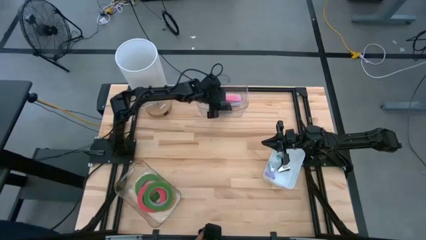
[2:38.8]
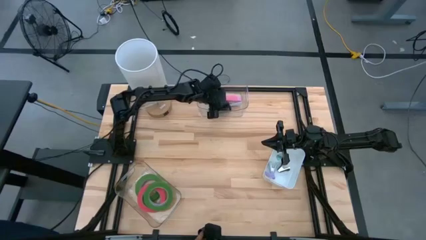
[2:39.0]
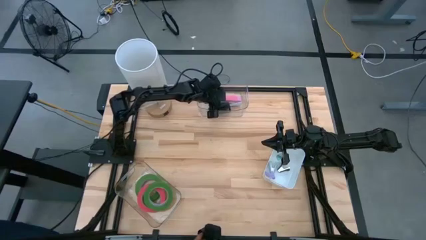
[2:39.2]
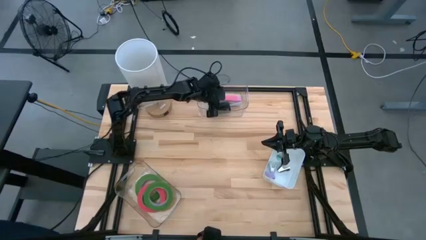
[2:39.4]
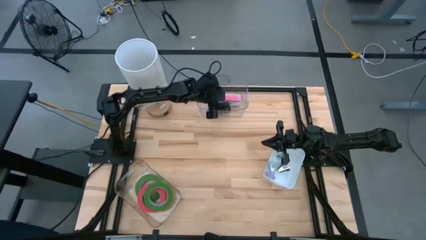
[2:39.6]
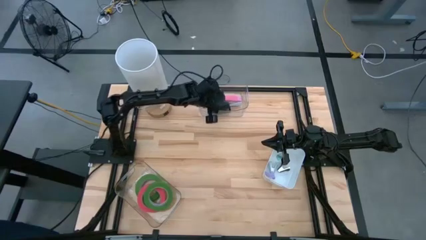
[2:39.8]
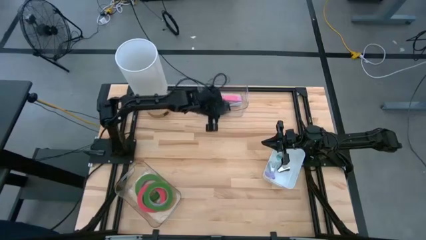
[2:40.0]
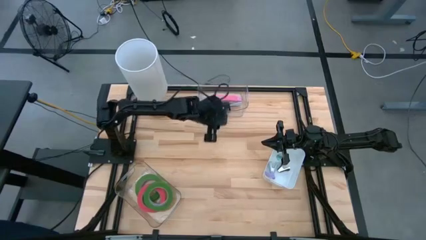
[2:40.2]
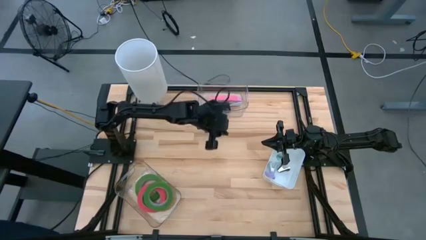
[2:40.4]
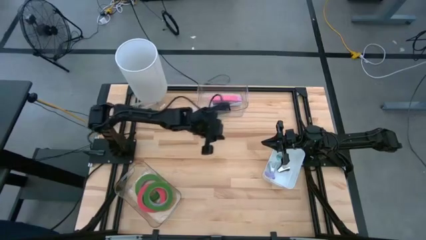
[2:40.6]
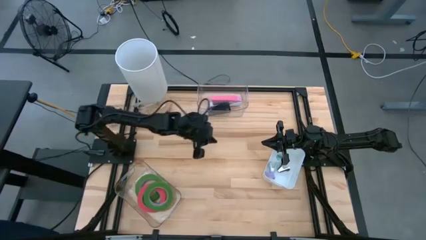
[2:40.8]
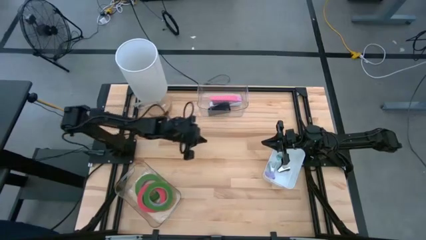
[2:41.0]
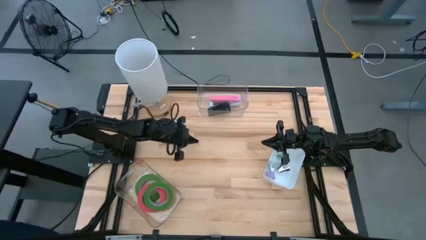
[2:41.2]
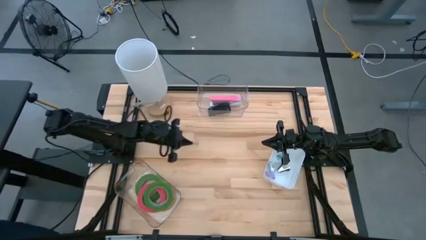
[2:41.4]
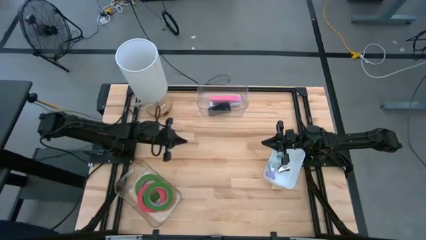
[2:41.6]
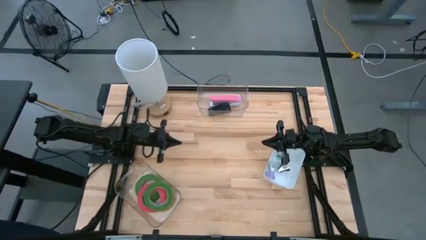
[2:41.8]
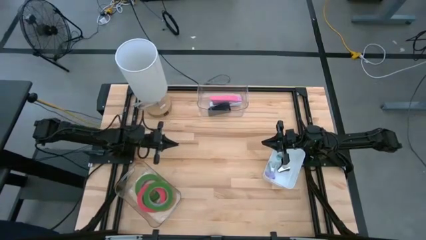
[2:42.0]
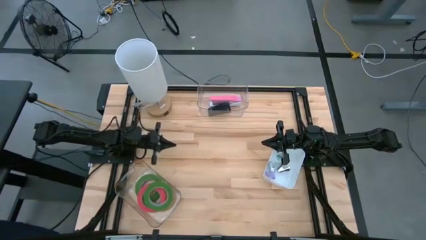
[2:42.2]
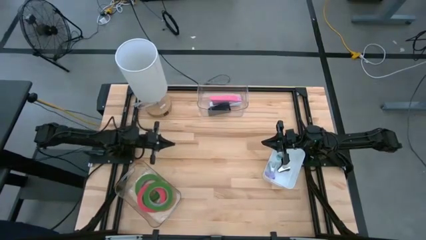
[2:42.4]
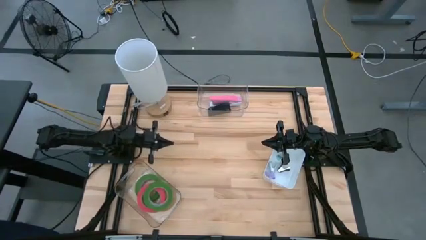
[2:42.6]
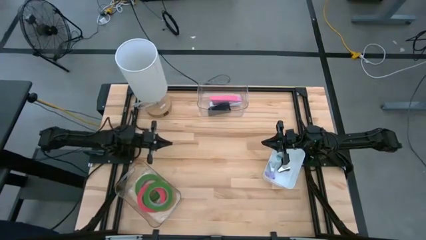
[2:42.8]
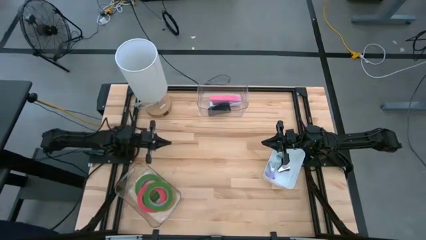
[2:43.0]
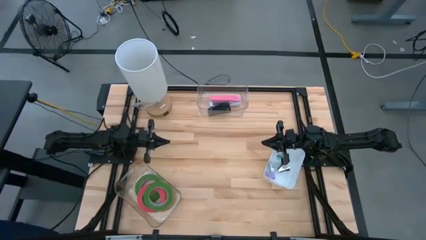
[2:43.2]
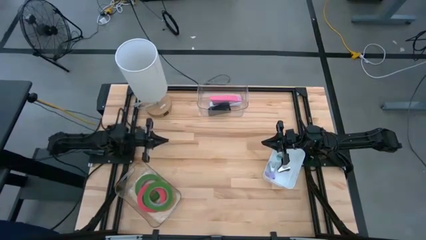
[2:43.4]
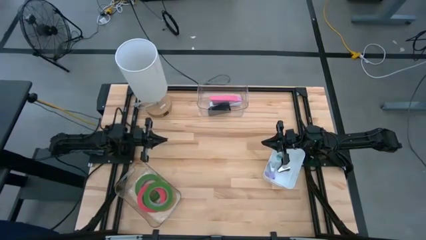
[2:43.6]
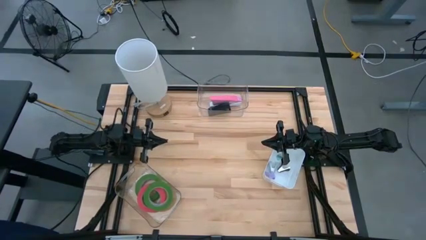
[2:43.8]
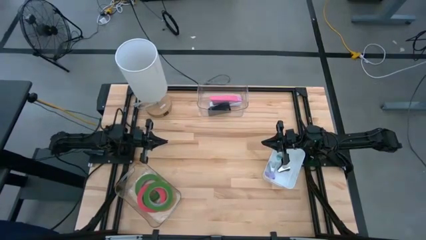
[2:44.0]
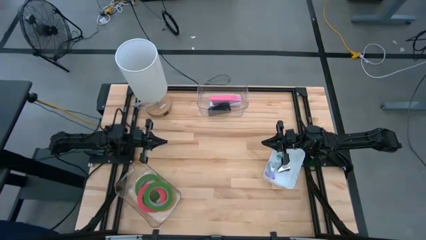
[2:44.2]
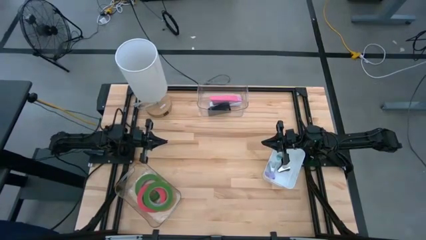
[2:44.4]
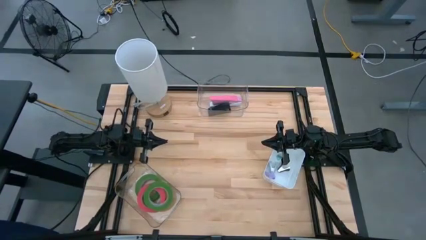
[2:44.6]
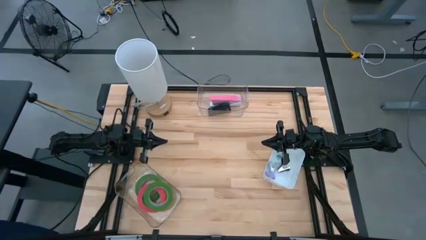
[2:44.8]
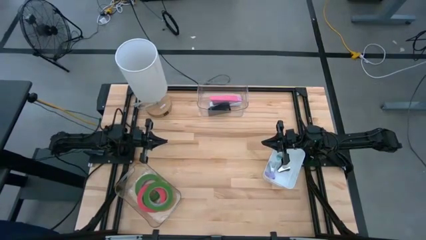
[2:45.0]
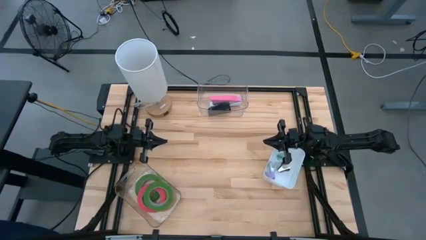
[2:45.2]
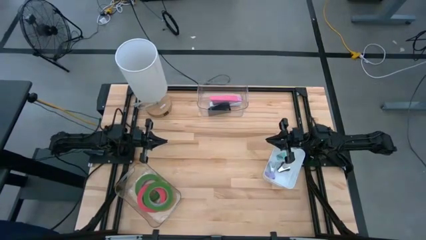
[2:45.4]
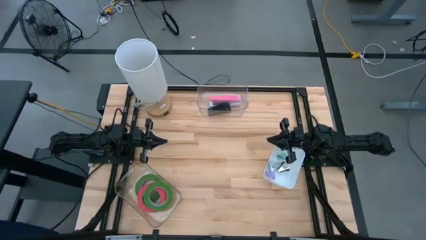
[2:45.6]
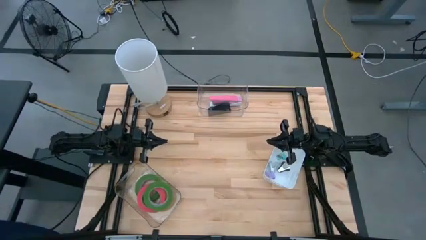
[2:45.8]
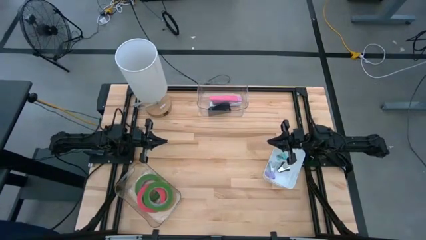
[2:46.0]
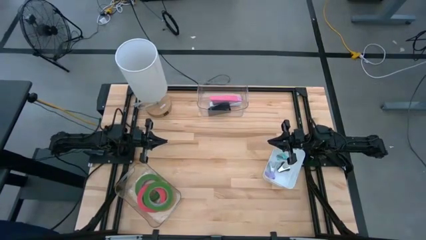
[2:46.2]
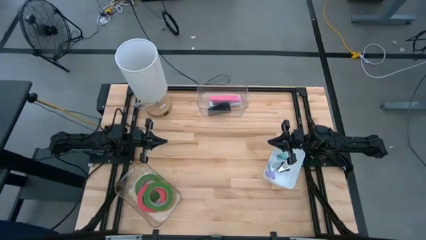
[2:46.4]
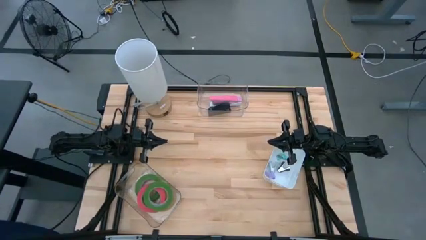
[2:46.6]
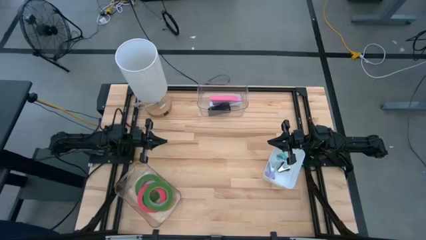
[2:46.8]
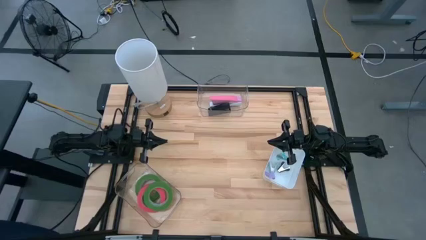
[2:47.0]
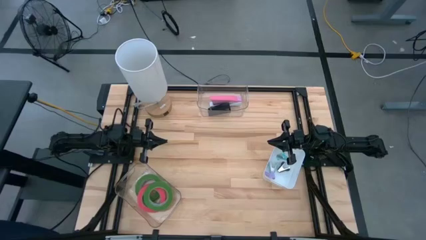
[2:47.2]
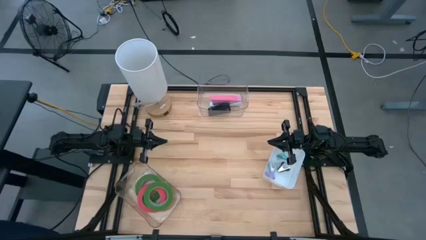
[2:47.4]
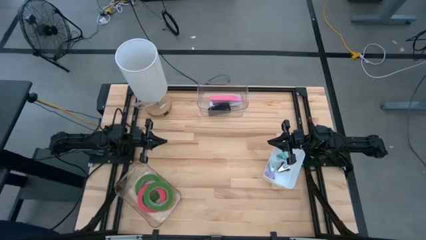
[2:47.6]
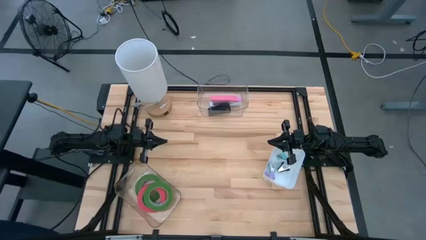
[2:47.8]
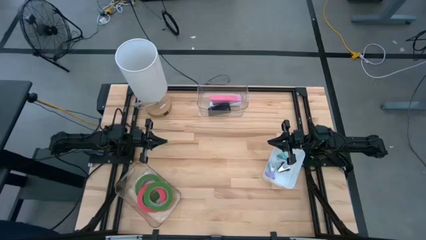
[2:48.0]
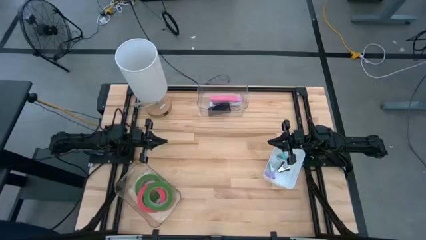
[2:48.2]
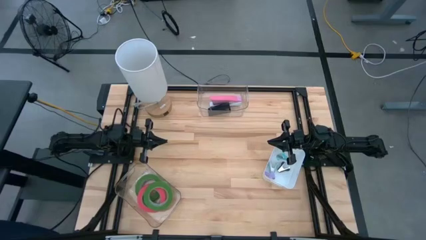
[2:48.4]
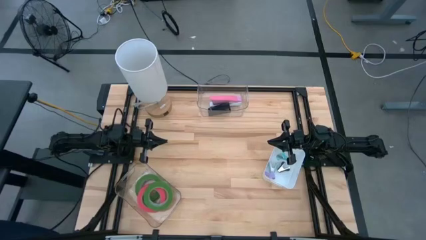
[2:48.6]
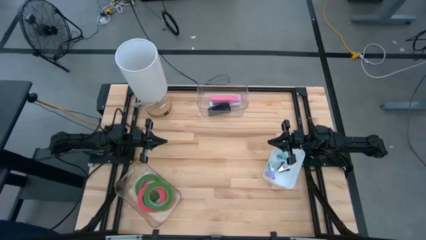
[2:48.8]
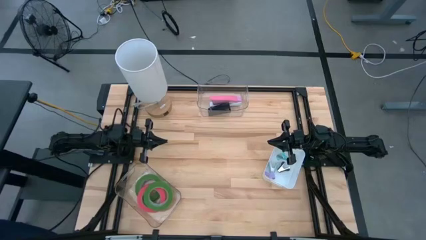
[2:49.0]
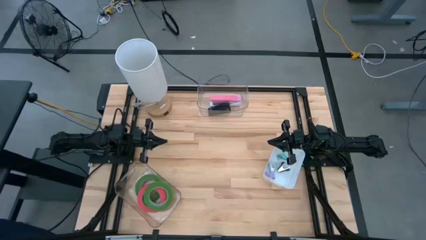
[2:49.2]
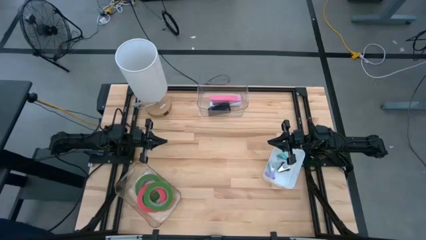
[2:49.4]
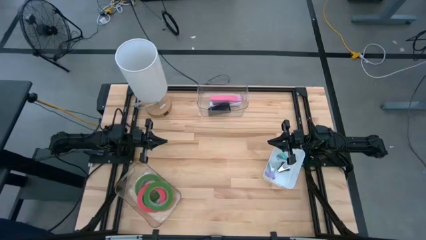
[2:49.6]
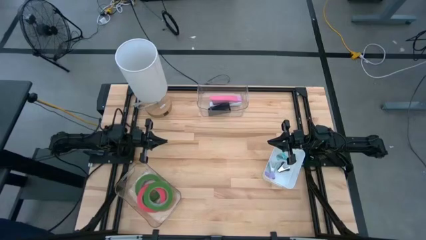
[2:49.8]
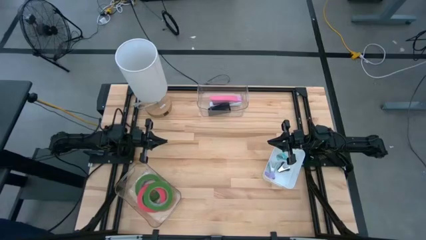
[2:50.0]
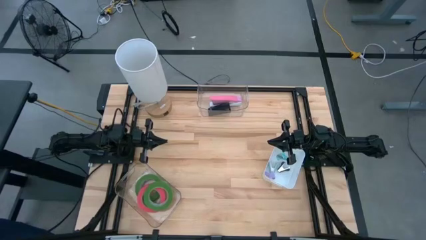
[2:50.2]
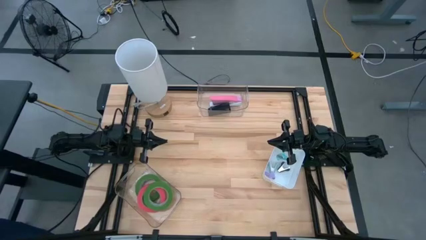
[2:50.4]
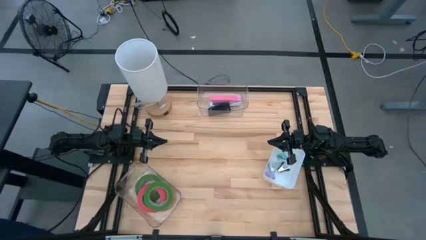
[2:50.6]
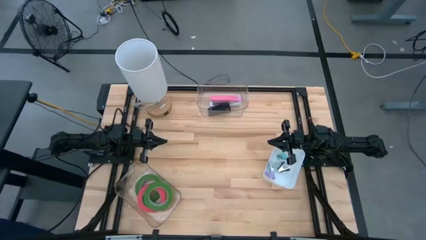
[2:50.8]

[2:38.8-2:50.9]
Task: Pick and place Stapler, Stapler remover, tape
Return to Home Position

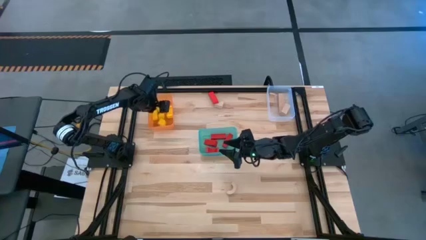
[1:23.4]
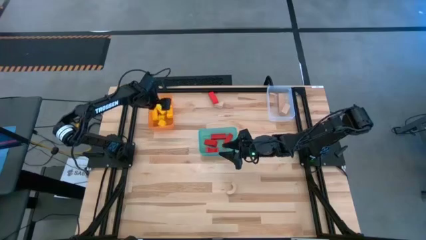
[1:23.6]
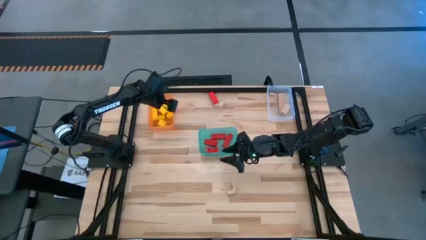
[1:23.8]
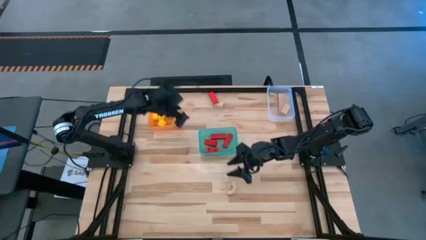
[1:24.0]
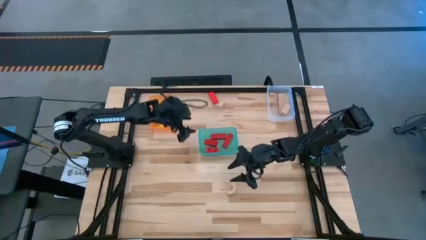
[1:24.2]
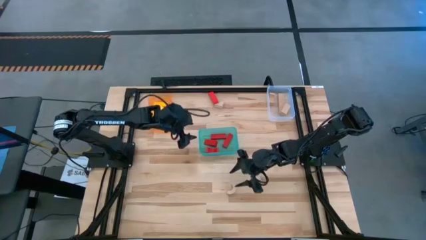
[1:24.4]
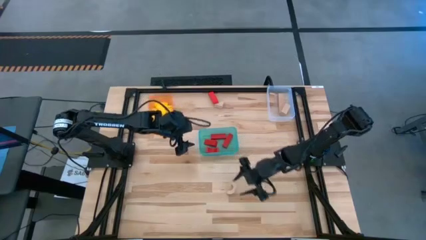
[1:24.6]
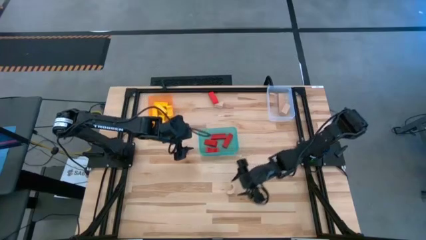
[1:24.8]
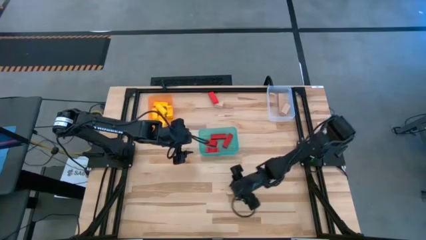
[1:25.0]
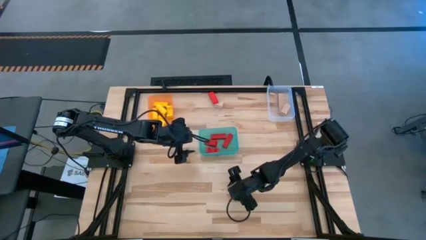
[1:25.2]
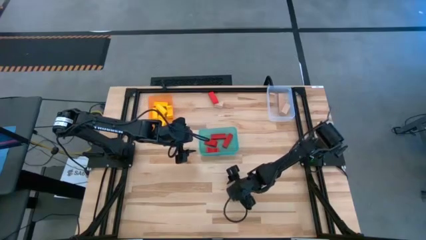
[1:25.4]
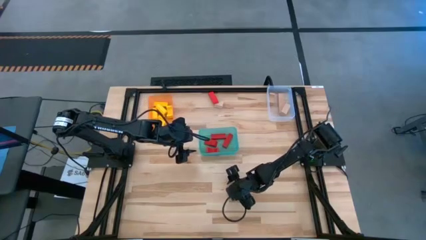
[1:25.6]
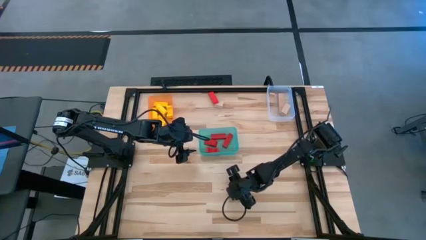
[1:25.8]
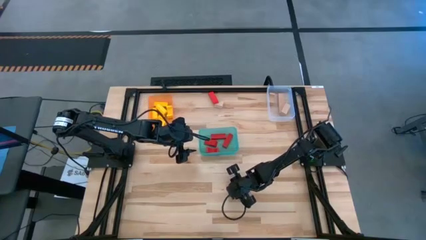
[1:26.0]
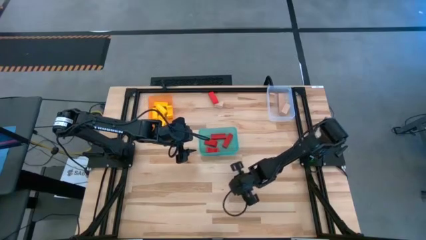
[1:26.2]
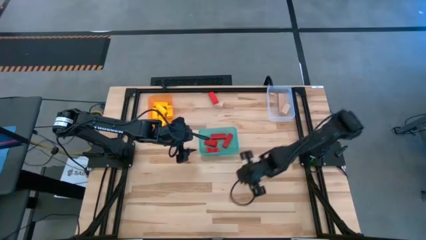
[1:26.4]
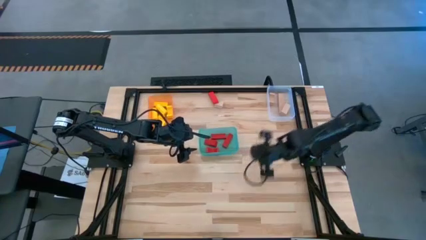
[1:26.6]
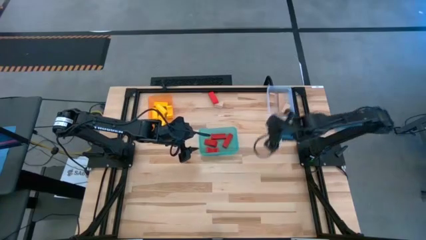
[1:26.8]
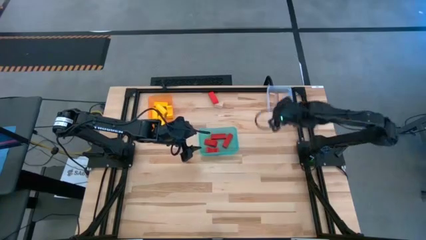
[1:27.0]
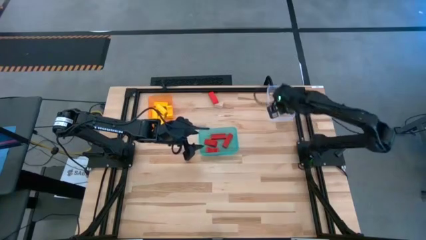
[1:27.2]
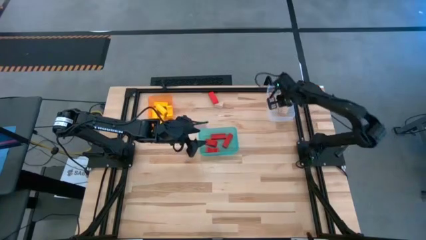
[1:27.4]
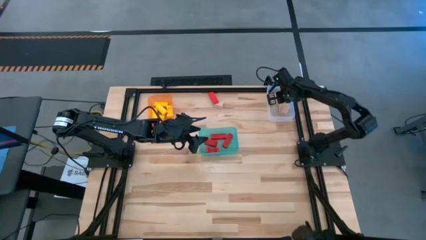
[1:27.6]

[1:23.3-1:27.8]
Task: Sort & place blocks by color
Put the brown block into the transparent bin
